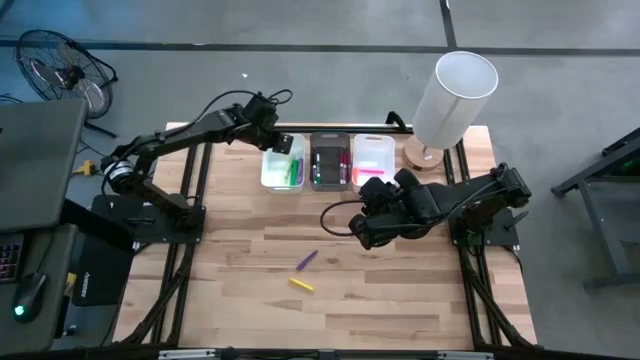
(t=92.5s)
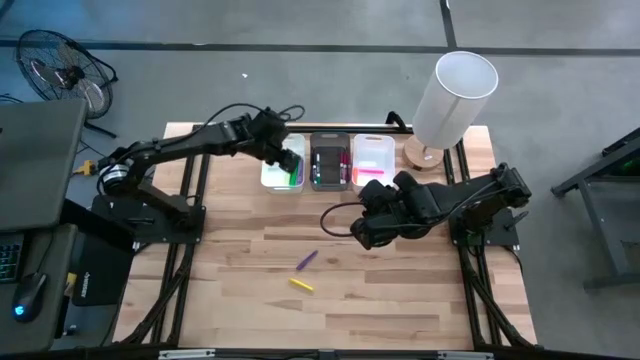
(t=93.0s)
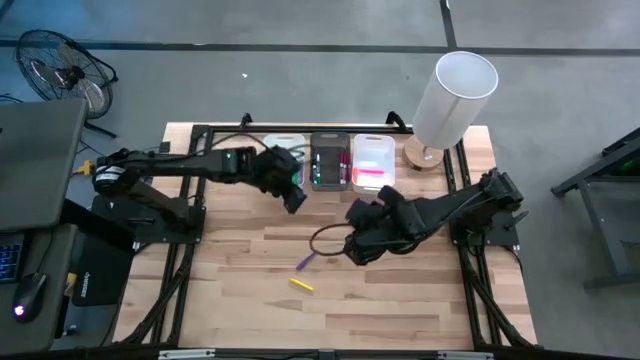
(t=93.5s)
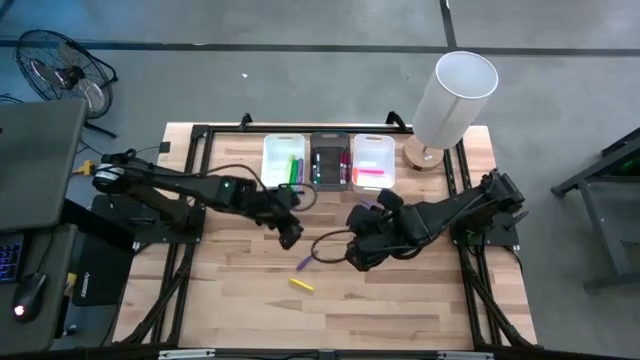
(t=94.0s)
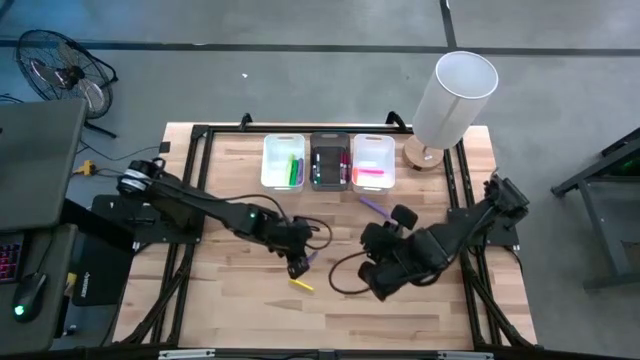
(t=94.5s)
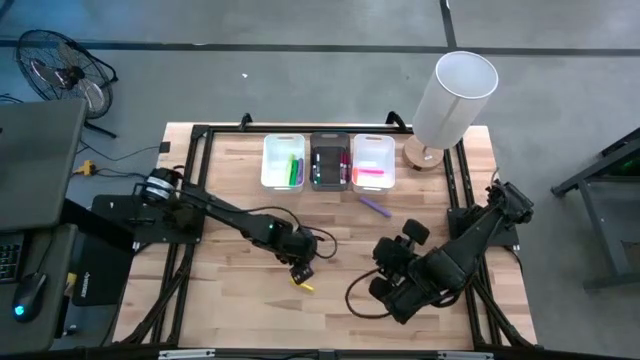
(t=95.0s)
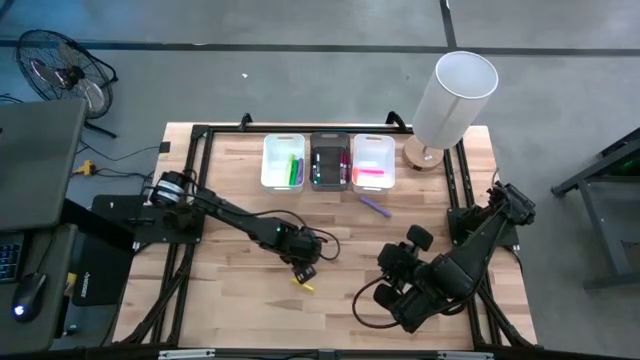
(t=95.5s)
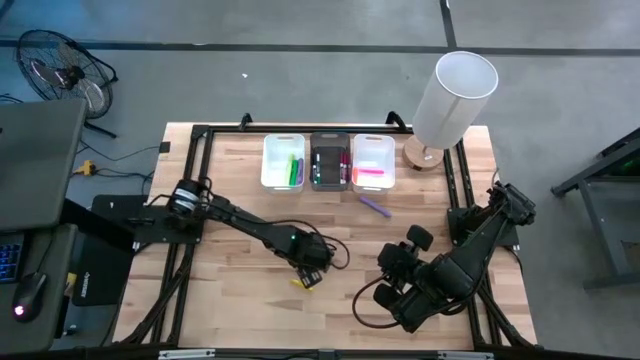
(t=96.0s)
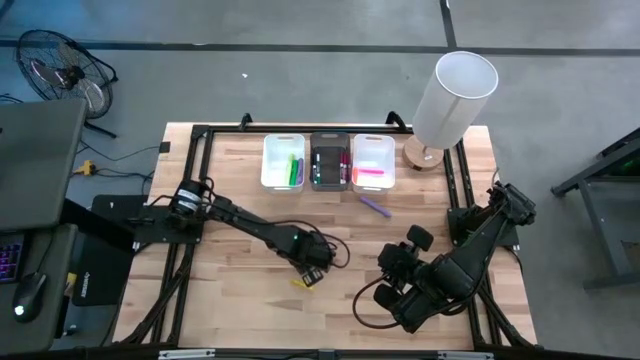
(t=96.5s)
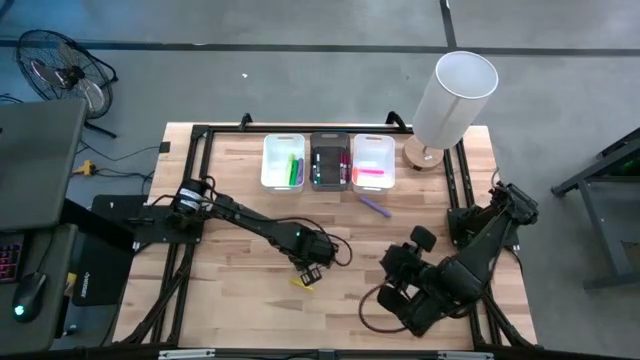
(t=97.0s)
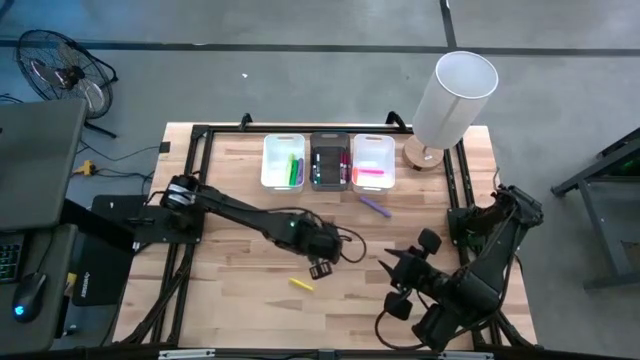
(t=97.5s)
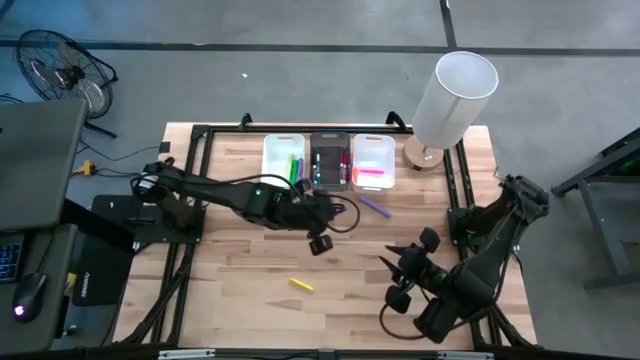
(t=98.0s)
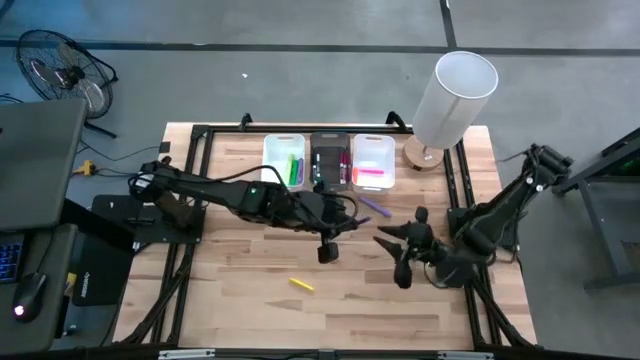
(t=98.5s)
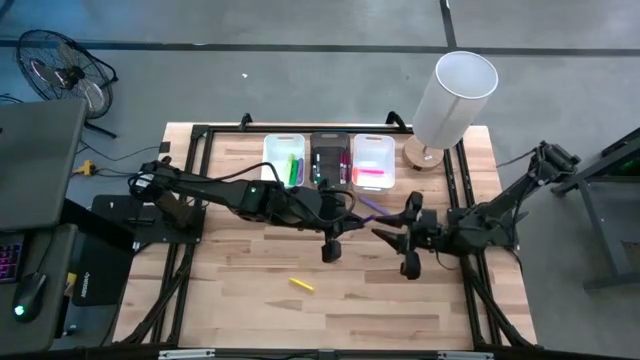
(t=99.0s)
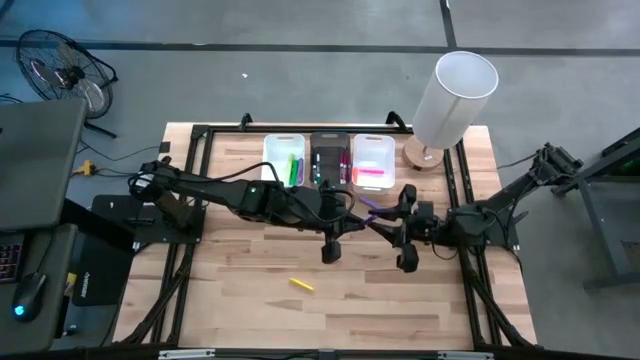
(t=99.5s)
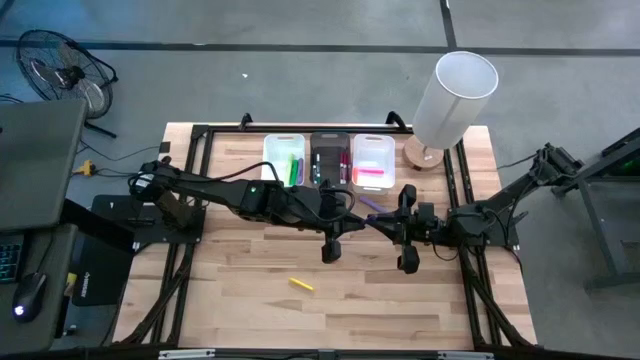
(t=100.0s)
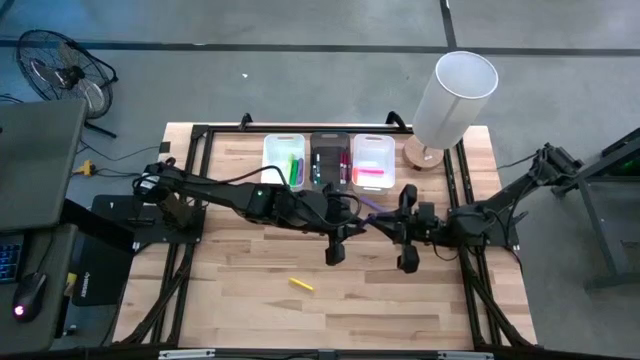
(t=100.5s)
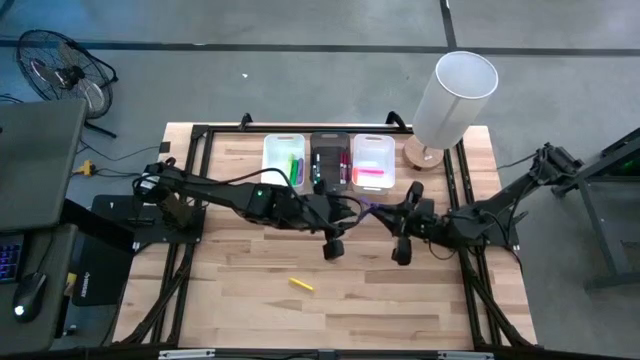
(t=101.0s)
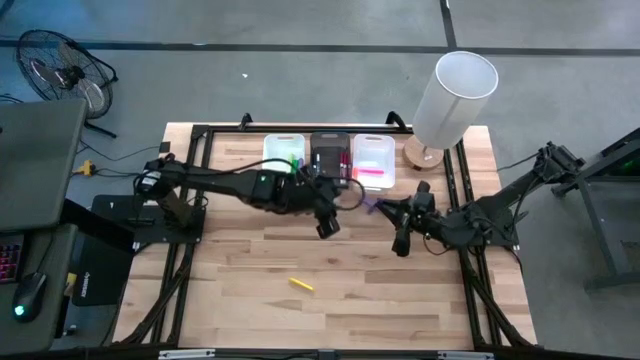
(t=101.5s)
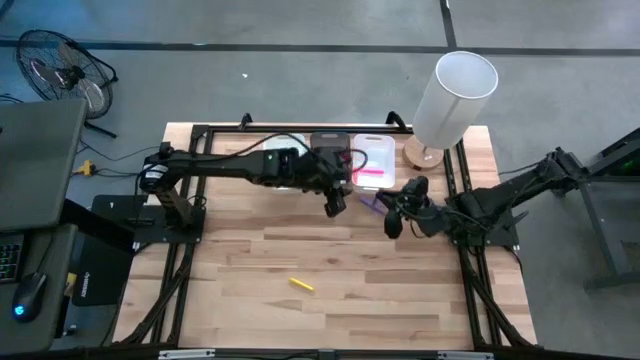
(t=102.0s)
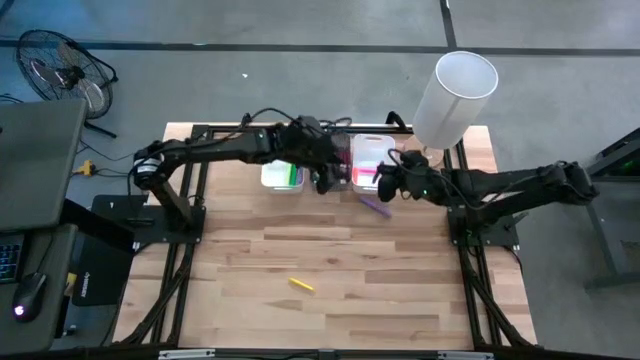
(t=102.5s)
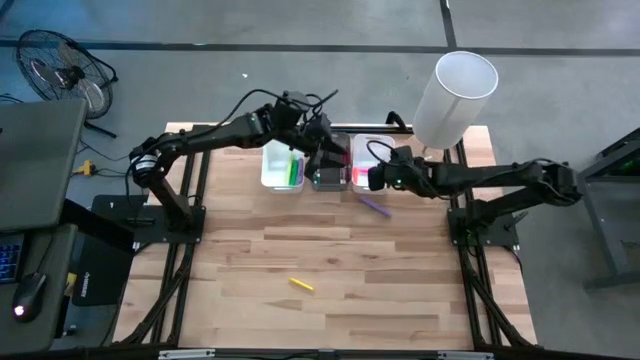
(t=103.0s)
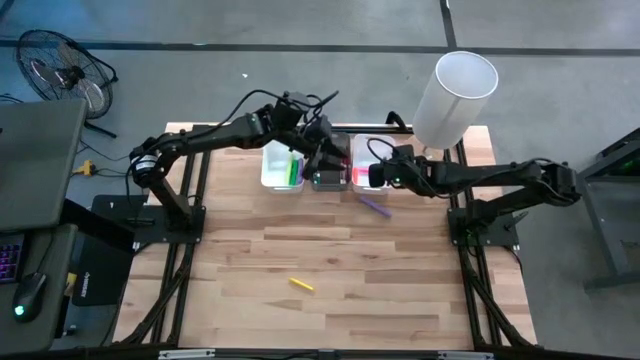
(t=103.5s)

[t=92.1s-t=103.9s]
Task: Pick & Place Markers
Put the purple pen into the right white bin

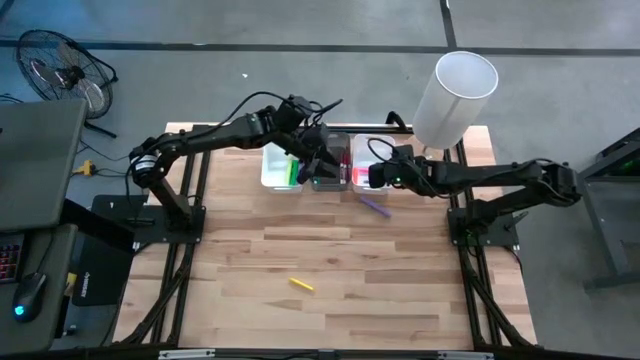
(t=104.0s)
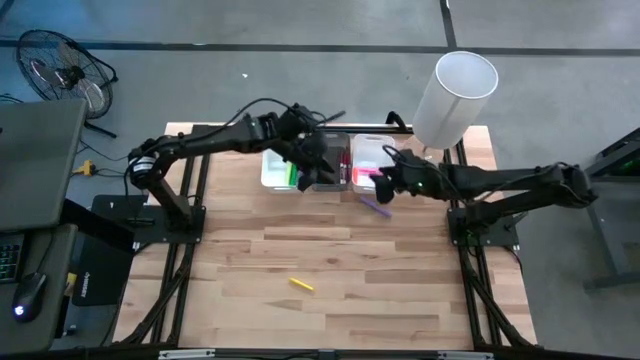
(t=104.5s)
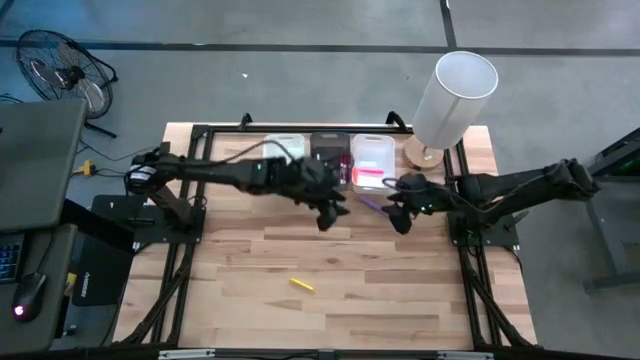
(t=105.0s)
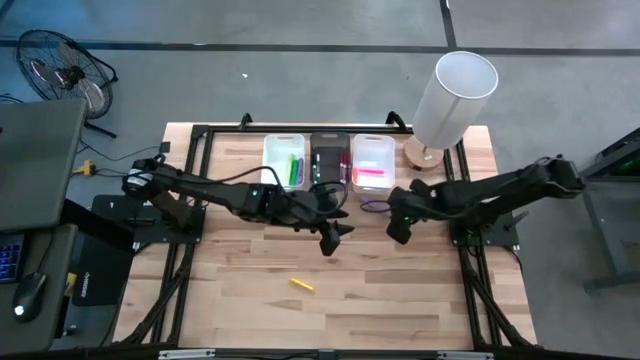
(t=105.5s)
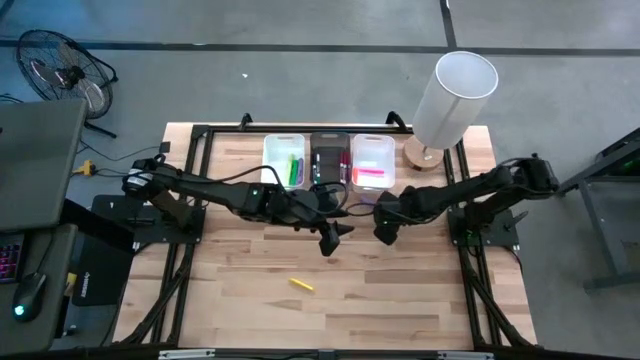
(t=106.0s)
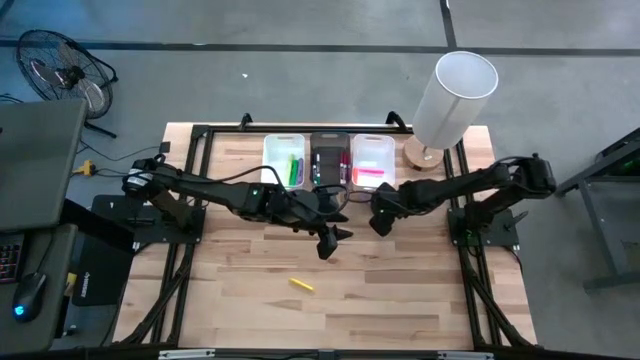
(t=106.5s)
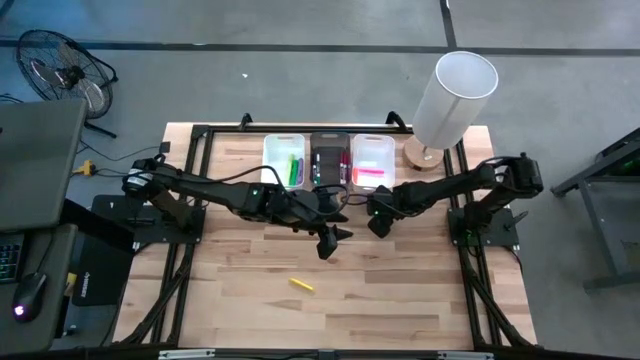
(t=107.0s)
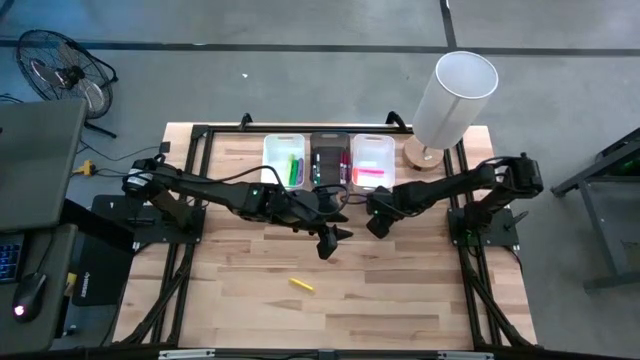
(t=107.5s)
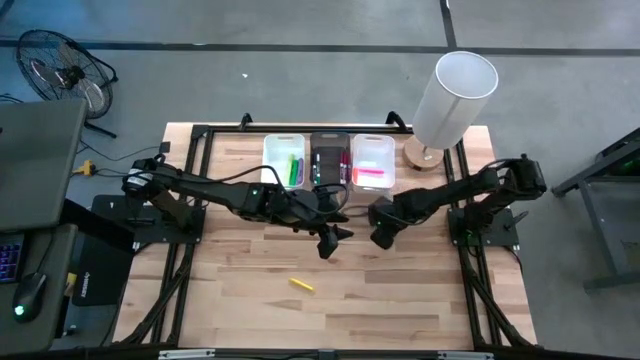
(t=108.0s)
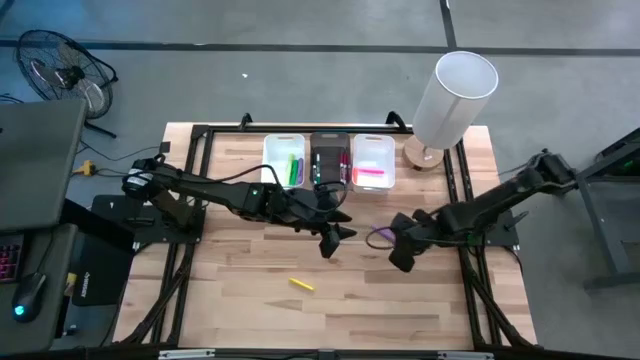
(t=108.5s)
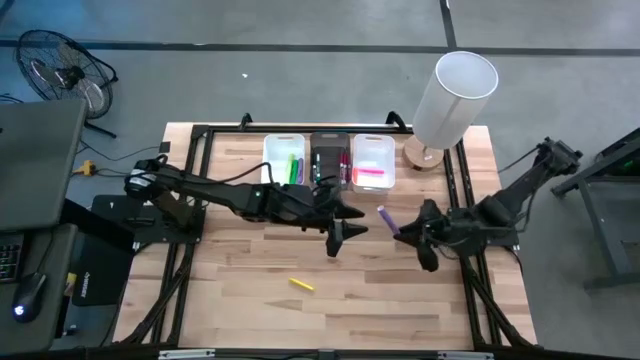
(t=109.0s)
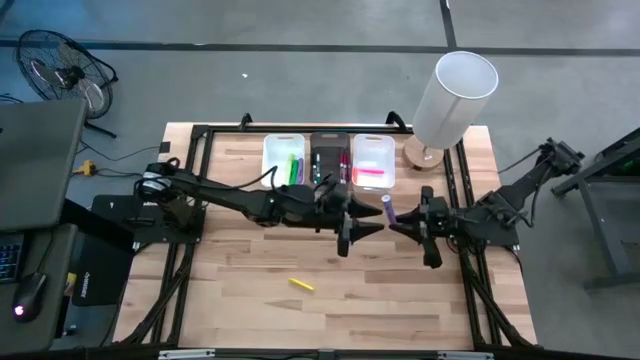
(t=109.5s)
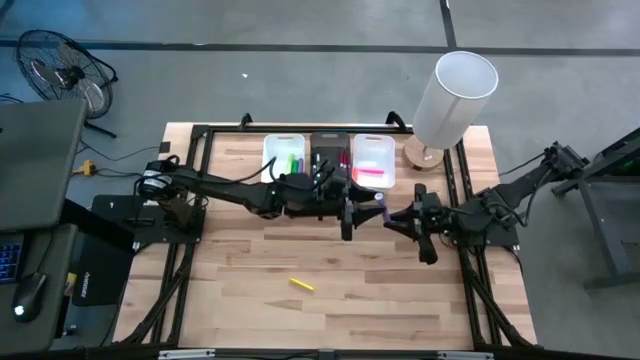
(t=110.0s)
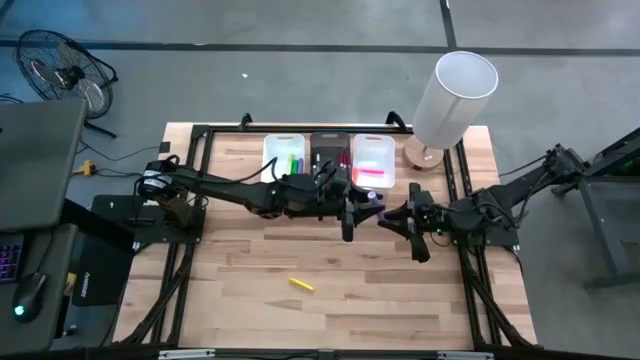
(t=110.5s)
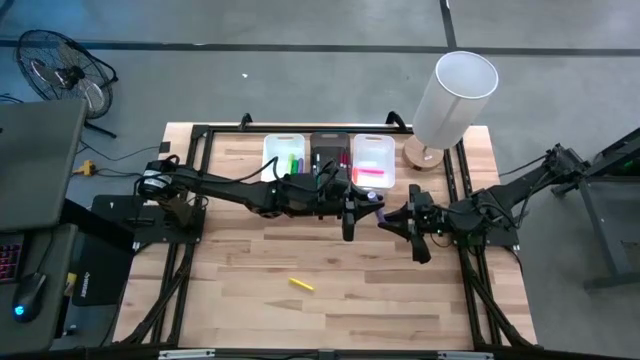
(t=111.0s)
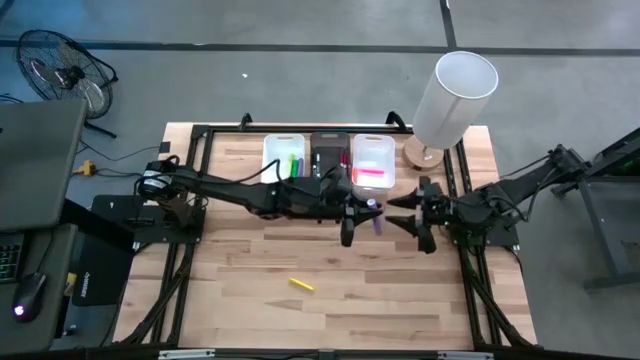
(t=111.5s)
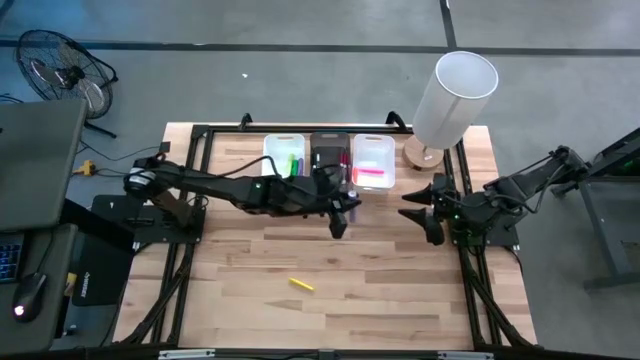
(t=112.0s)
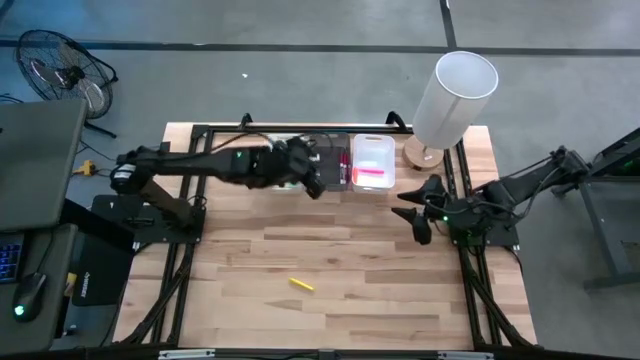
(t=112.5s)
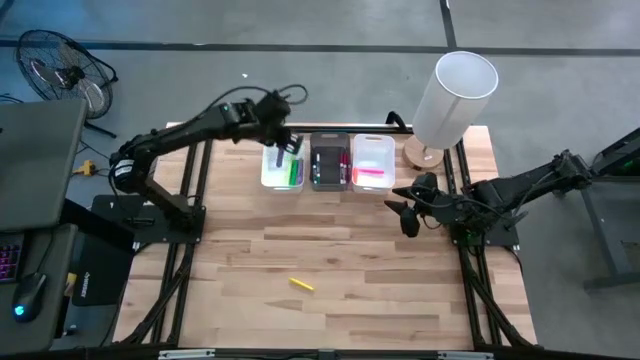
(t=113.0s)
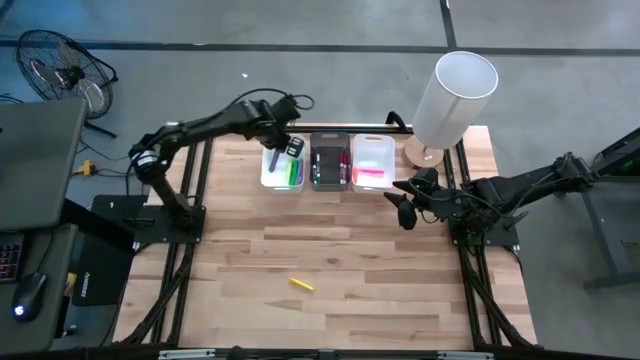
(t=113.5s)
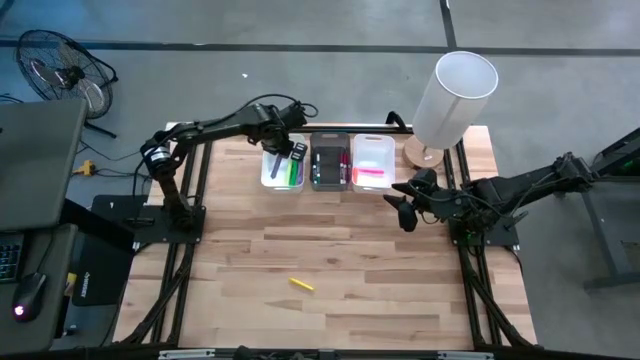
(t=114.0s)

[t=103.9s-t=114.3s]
Put the purple highlighter pen into the left white bin
